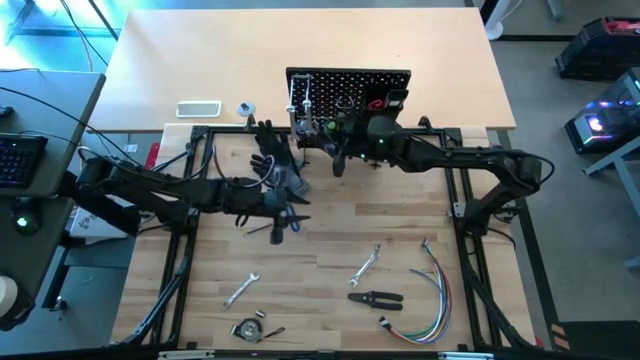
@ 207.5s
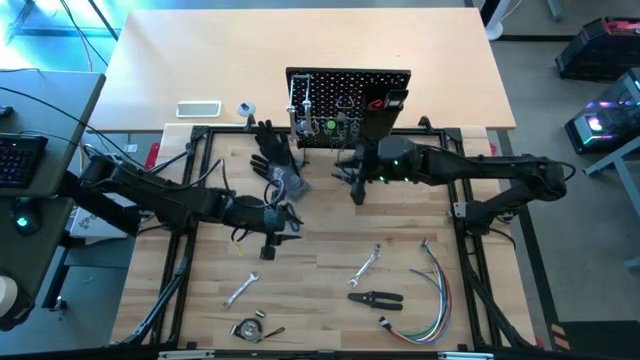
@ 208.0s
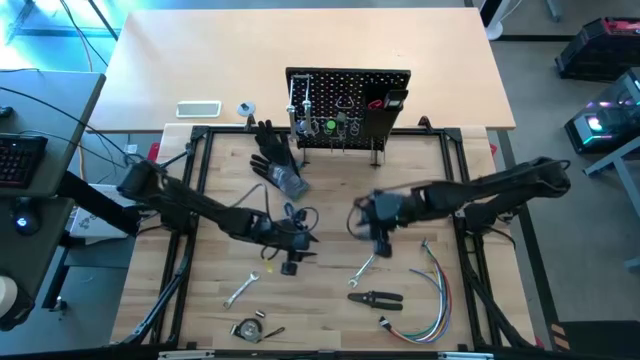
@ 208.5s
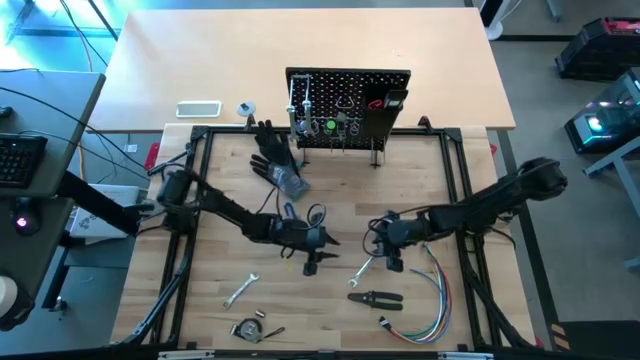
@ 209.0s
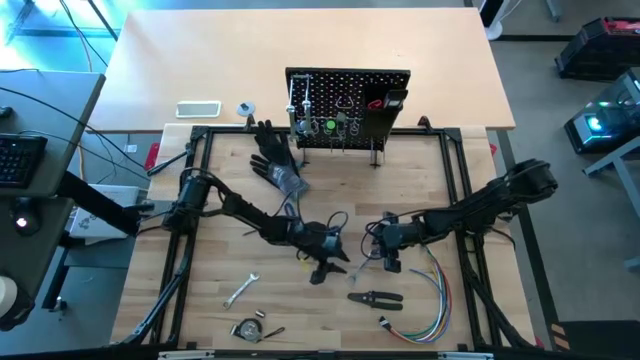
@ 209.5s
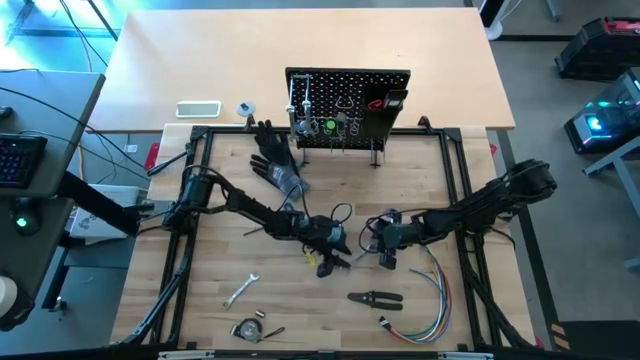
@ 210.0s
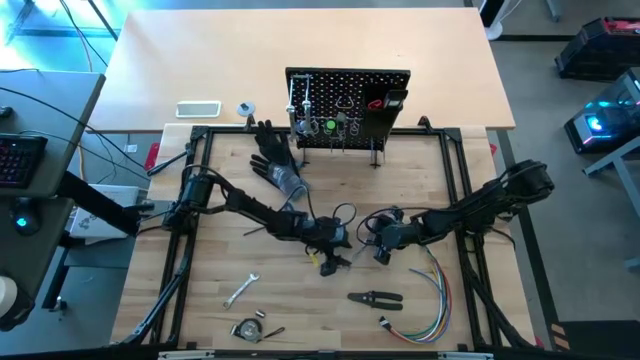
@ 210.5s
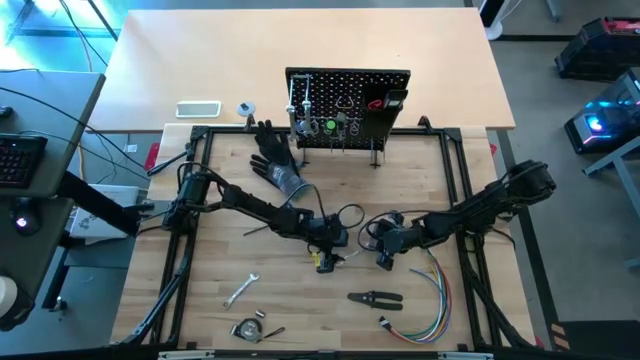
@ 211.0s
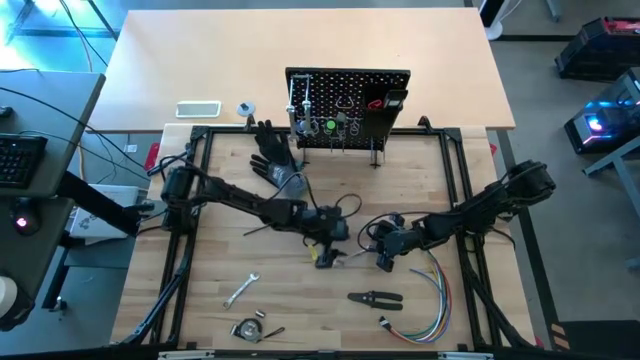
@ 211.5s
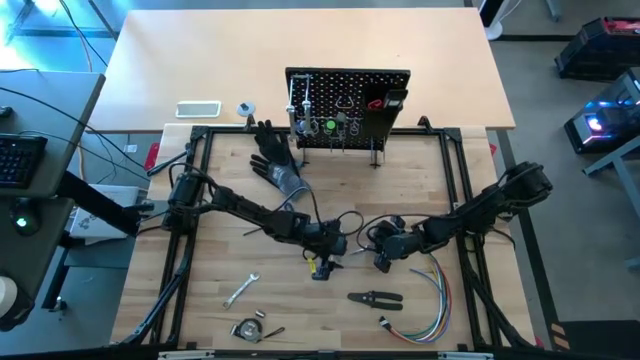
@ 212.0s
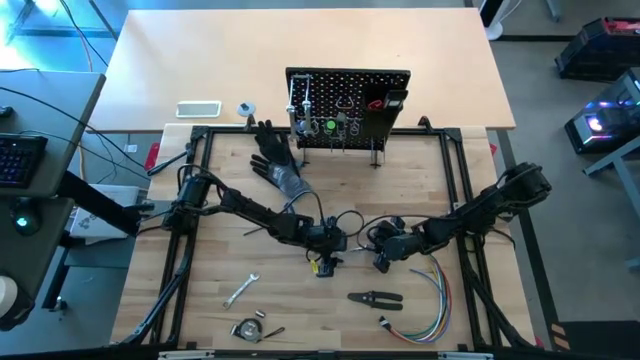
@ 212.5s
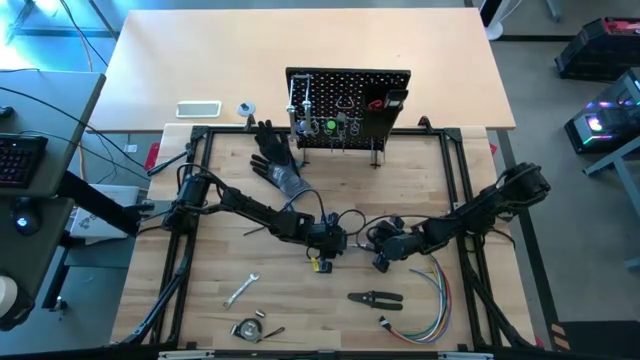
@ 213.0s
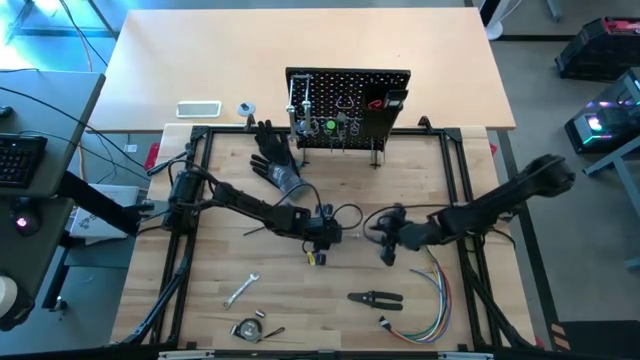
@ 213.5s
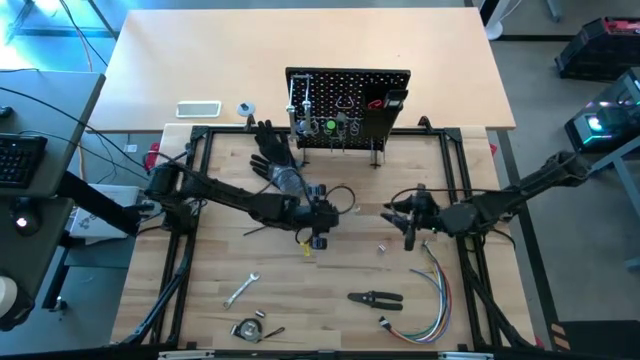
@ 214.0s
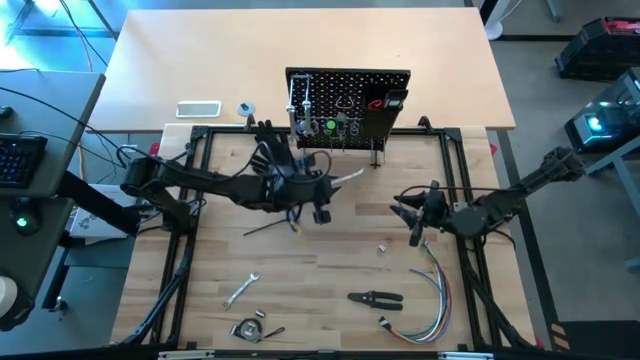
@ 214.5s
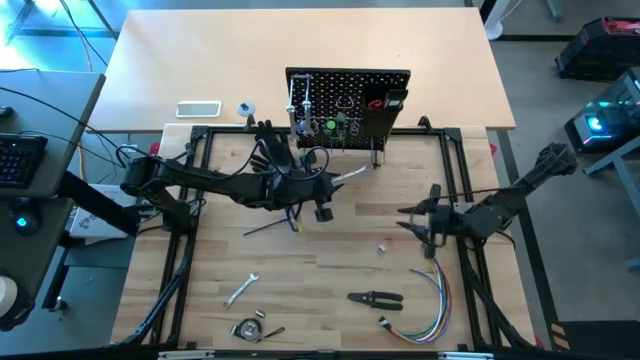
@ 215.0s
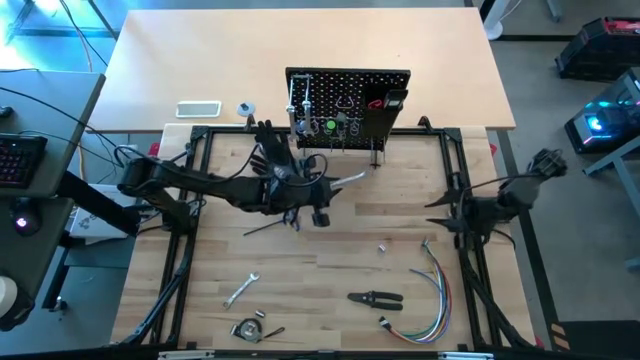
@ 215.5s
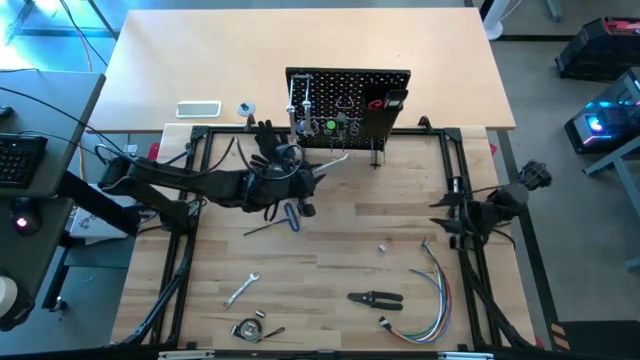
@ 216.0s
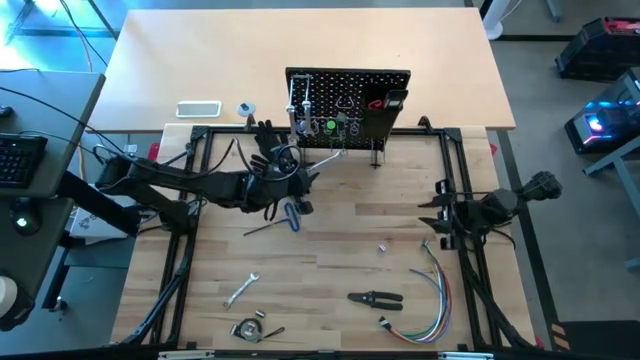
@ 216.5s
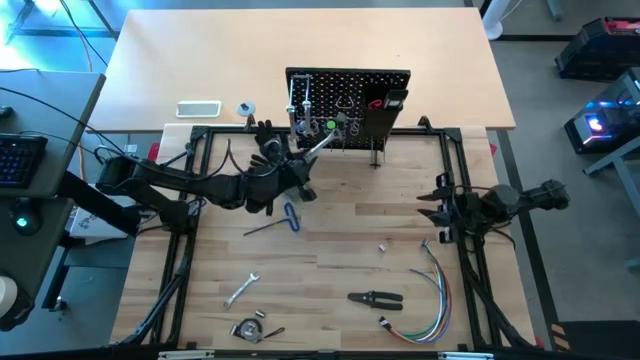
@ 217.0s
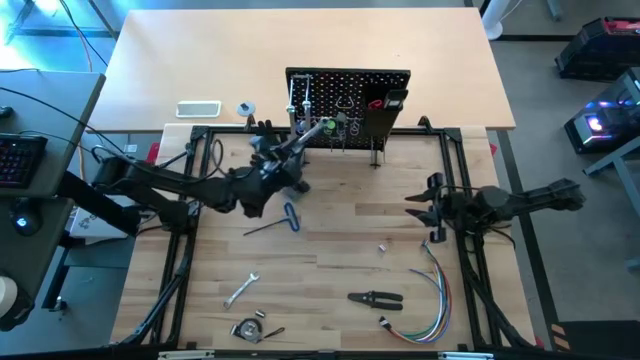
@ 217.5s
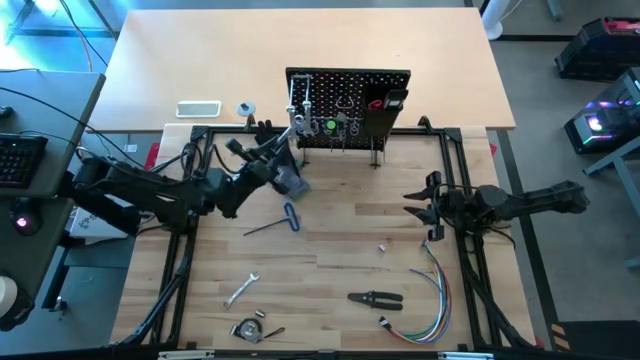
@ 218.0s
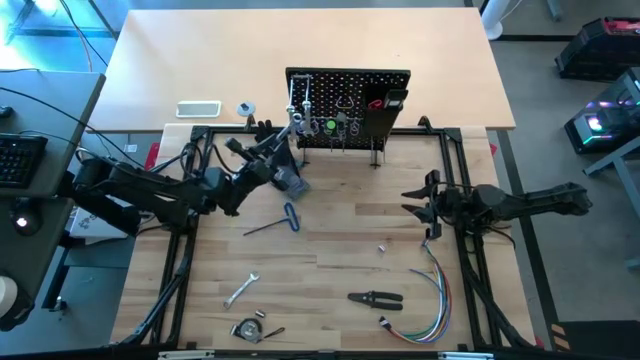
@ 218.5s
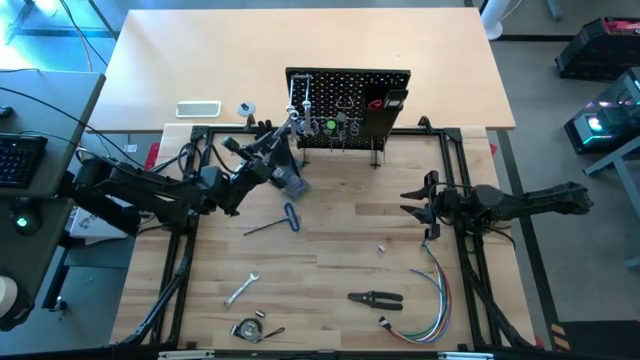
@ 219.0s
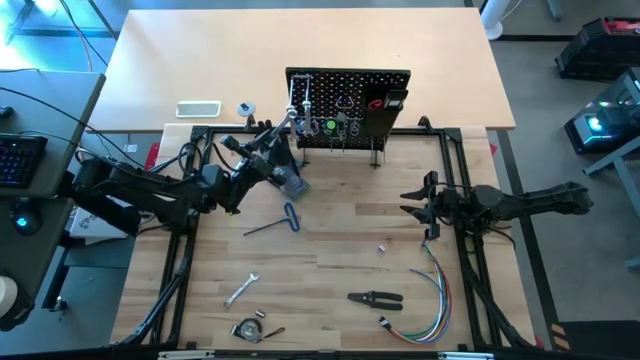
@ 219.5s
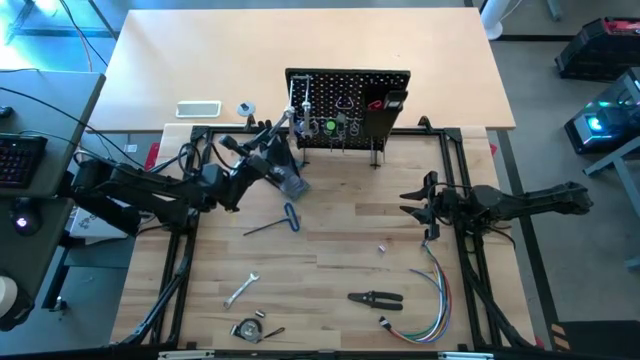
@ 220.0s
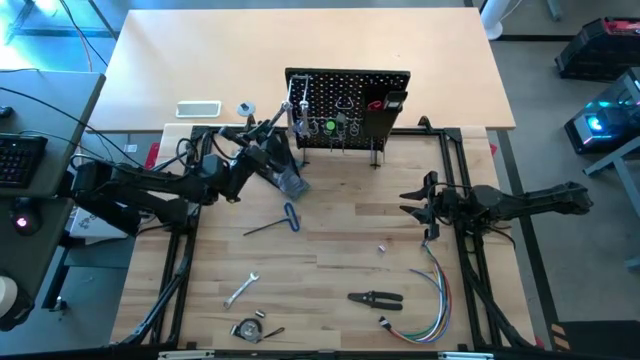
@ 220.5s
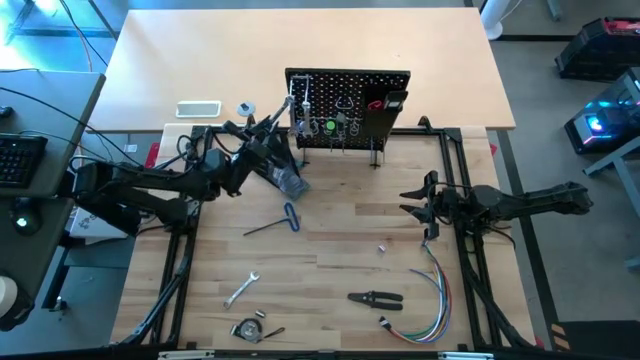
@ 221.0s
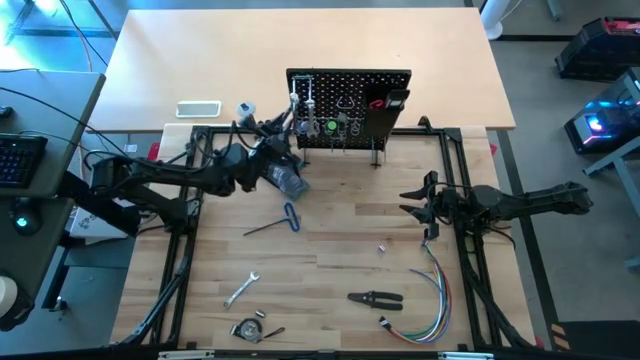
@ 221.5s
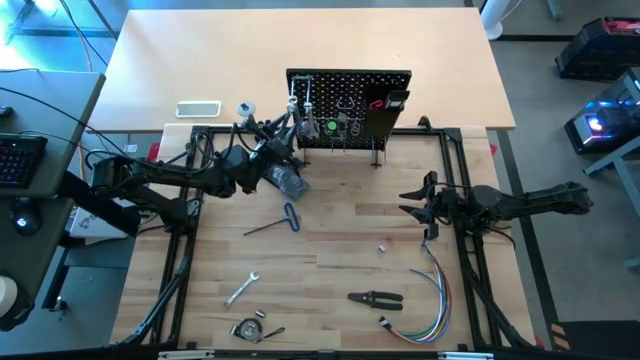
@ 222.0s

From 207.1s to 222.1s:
Task: Hang tools onto peg board
Hang the silver wrench on the pegboard

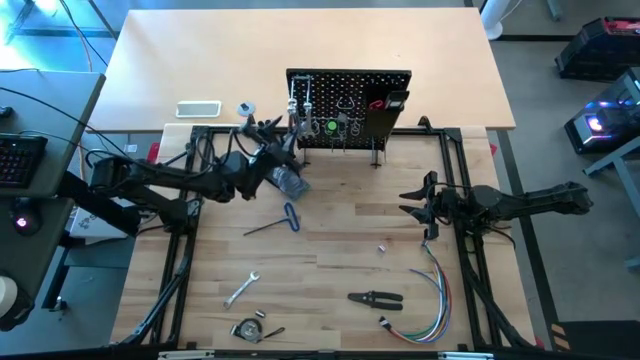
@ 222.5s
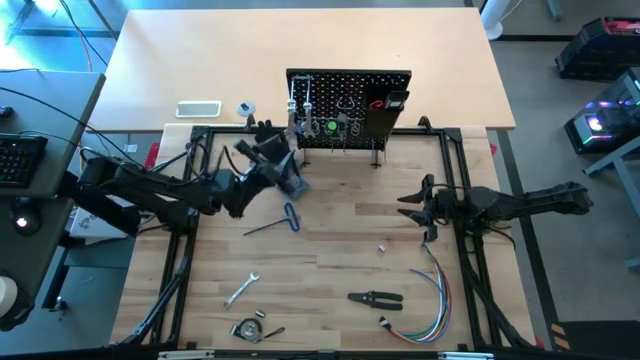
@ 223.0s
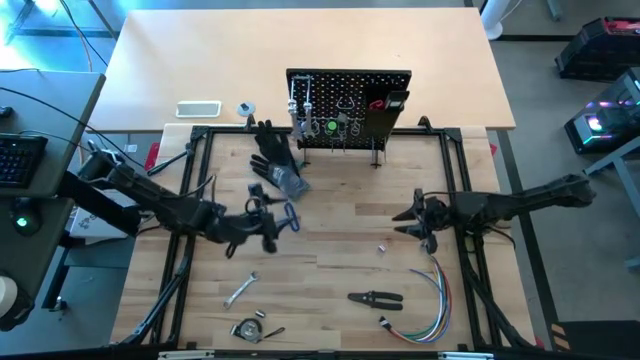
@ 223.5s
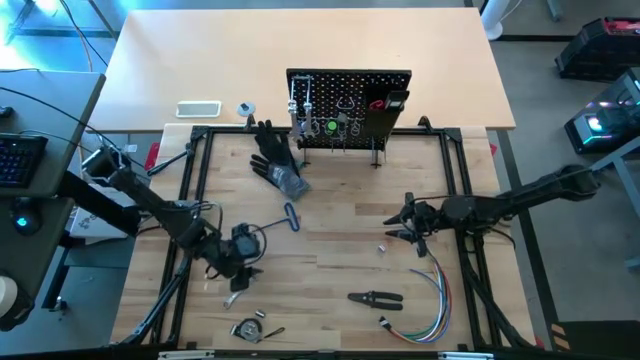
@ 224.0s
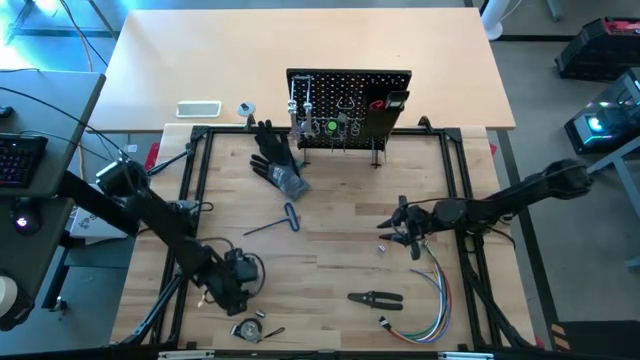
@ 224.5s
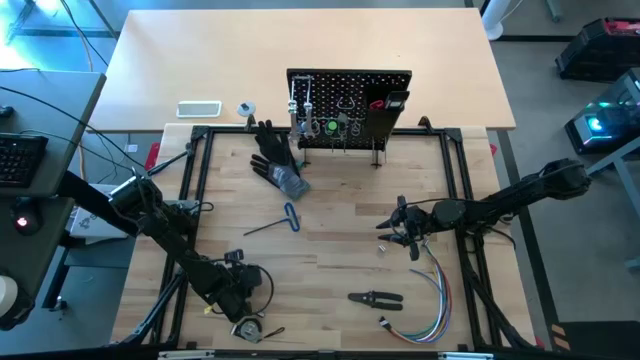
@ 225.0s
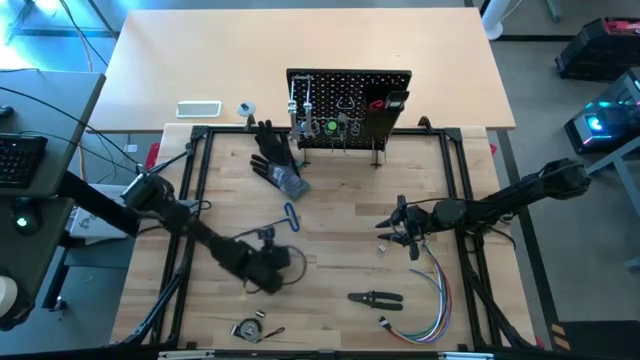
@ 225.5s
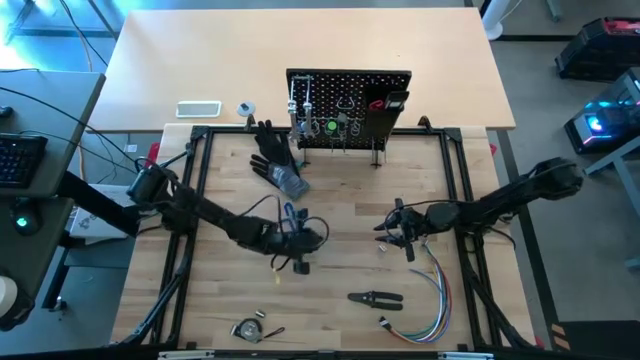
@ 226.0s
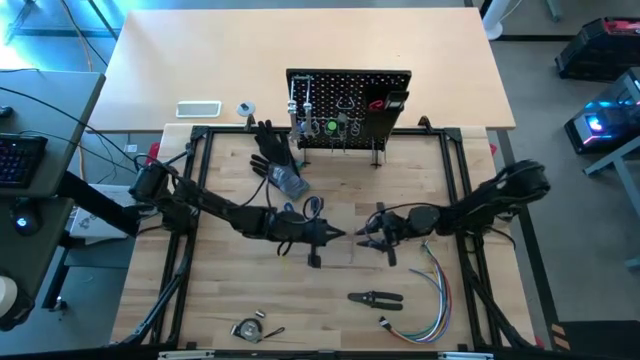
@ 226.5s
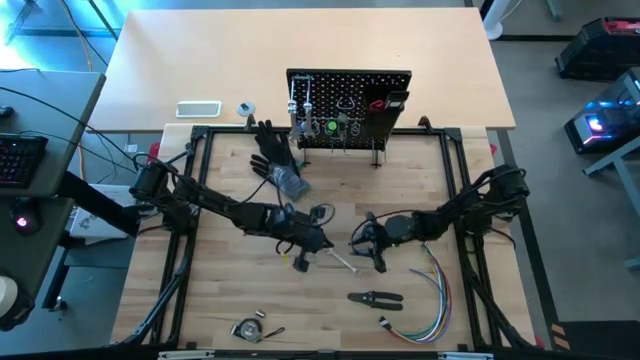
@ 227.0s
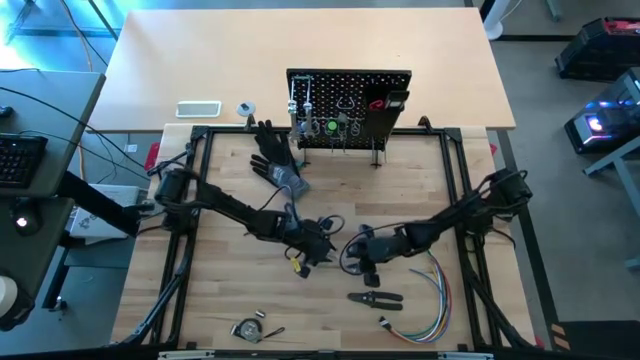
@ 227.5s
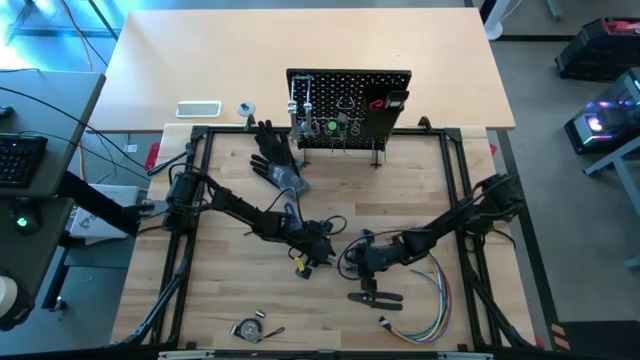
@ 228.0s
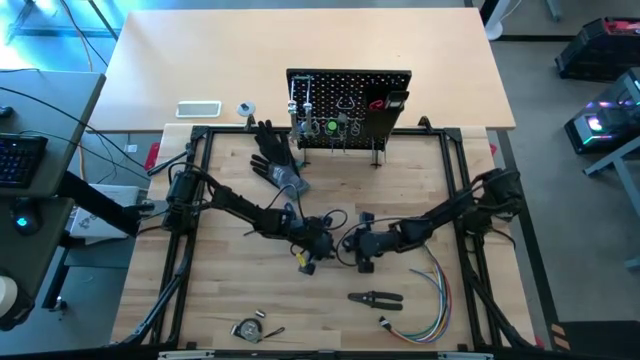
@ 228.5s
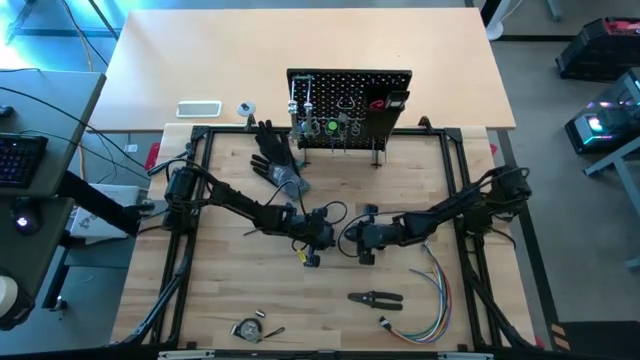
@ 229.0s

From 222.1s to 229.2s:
Hang the silver wrench on the pegboard
